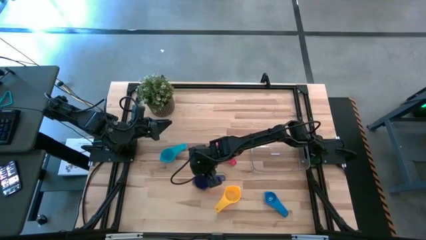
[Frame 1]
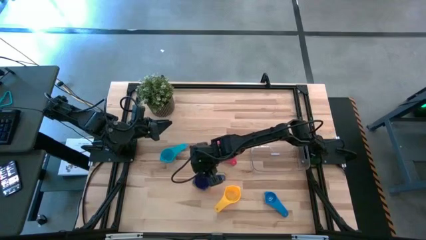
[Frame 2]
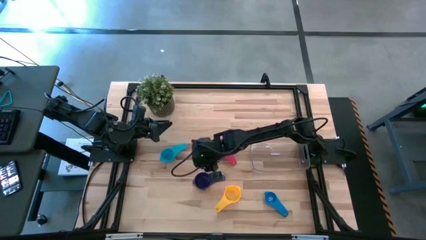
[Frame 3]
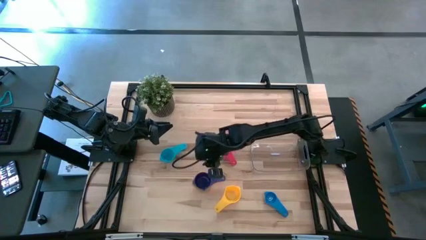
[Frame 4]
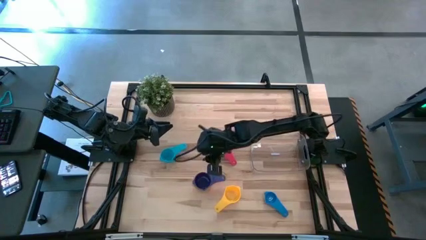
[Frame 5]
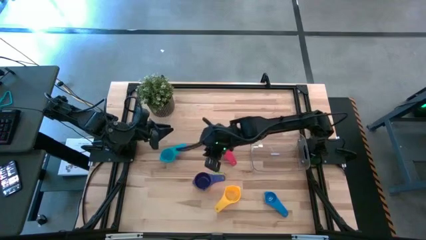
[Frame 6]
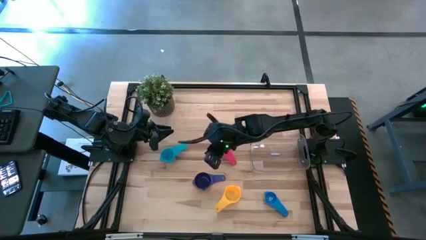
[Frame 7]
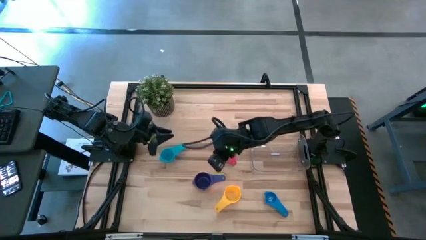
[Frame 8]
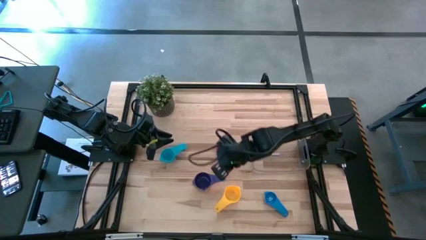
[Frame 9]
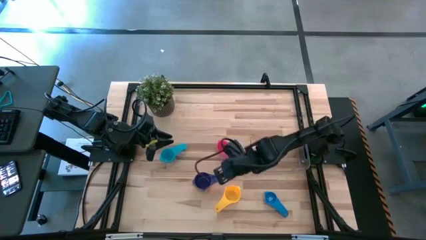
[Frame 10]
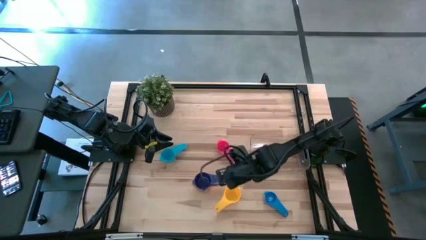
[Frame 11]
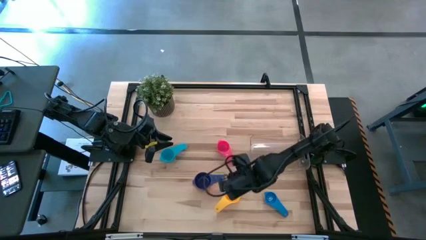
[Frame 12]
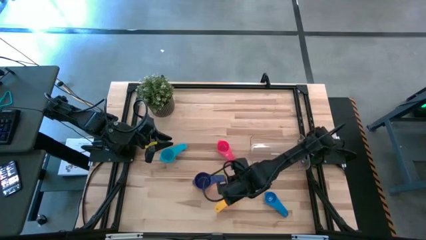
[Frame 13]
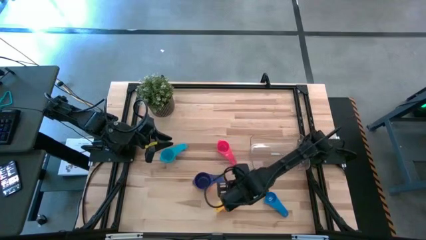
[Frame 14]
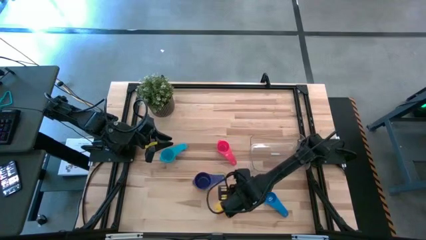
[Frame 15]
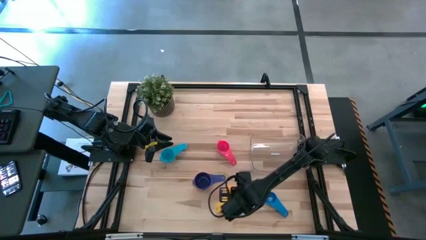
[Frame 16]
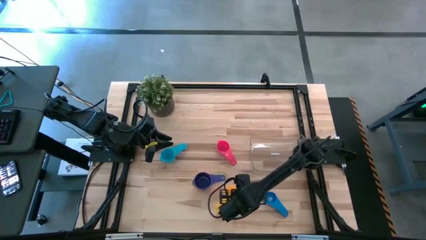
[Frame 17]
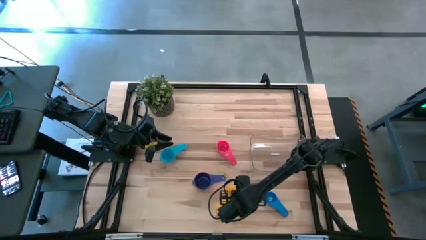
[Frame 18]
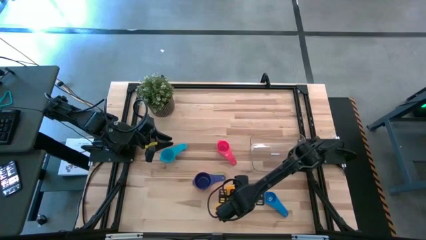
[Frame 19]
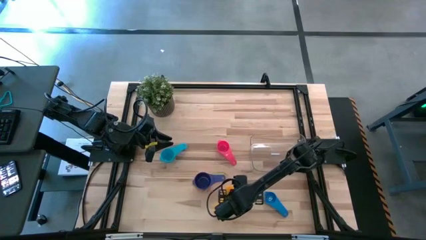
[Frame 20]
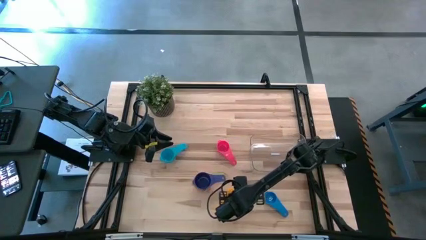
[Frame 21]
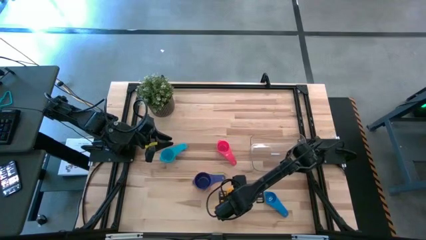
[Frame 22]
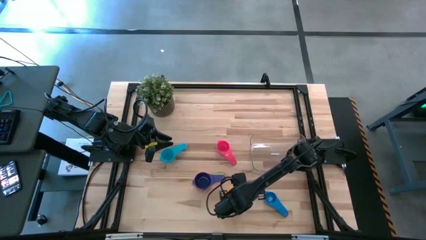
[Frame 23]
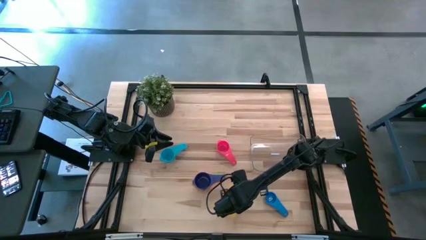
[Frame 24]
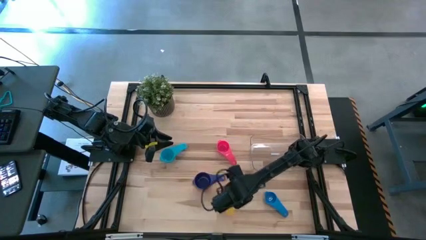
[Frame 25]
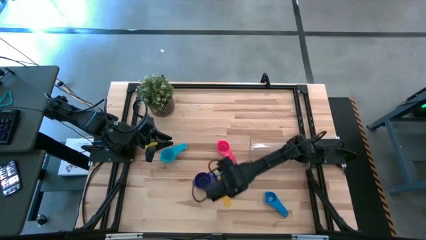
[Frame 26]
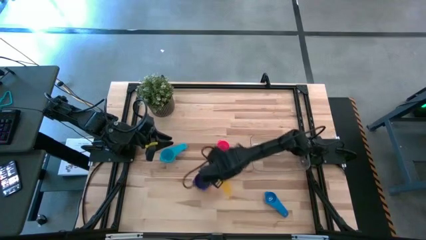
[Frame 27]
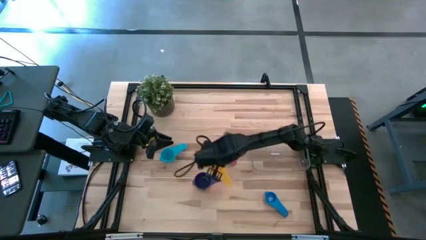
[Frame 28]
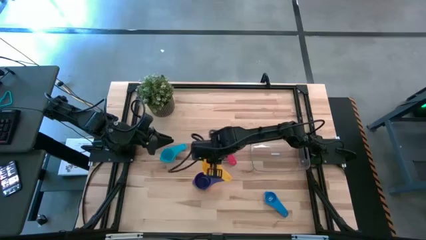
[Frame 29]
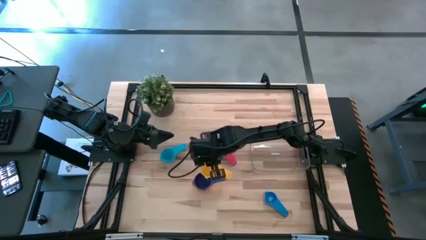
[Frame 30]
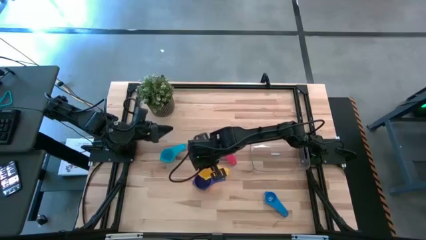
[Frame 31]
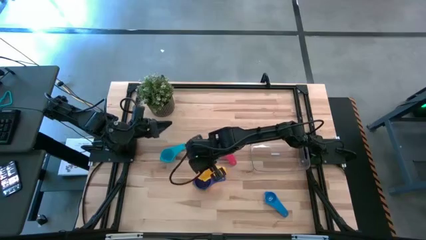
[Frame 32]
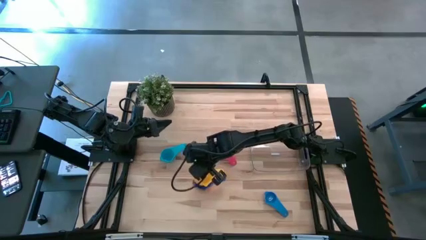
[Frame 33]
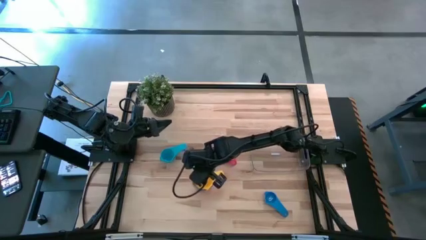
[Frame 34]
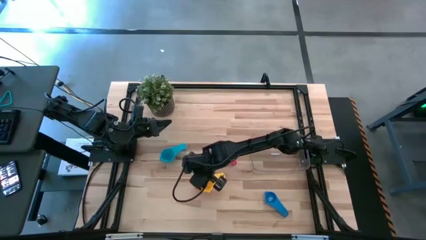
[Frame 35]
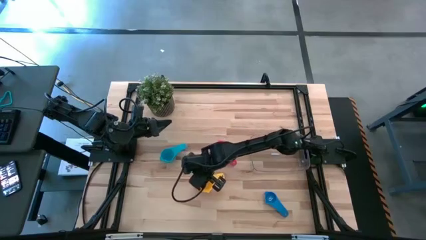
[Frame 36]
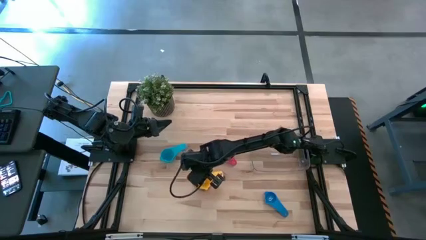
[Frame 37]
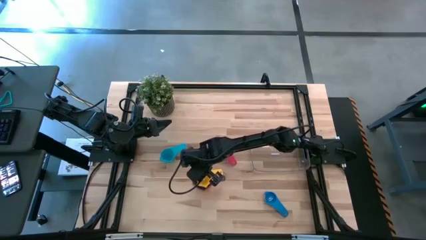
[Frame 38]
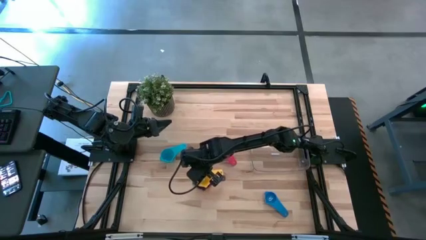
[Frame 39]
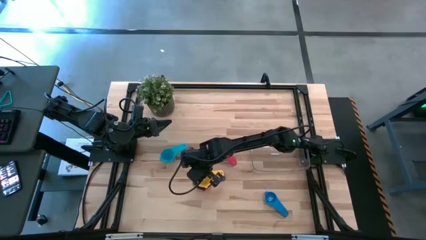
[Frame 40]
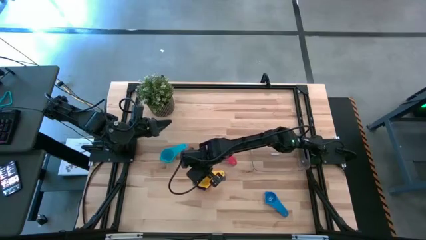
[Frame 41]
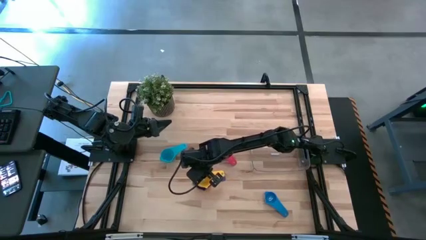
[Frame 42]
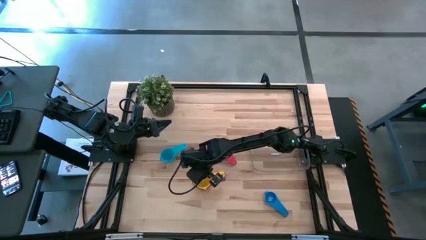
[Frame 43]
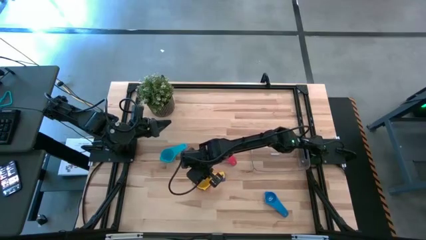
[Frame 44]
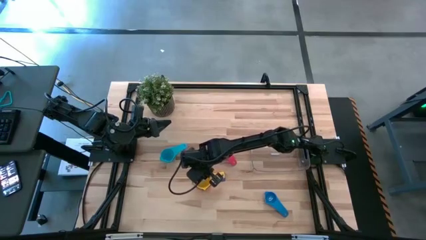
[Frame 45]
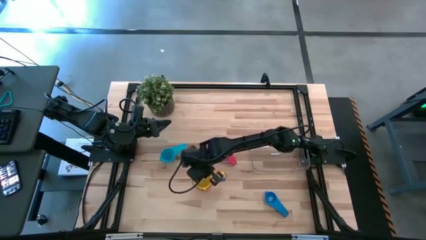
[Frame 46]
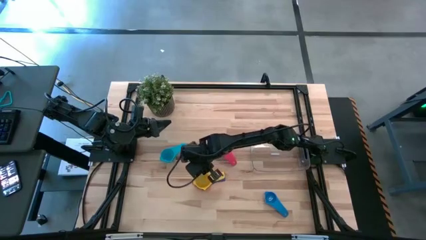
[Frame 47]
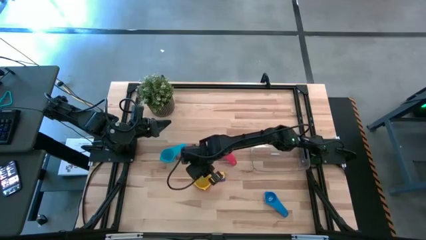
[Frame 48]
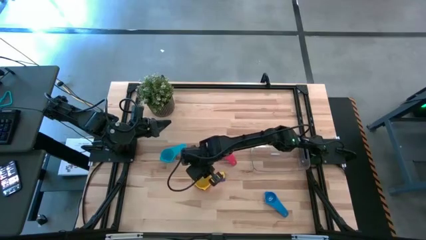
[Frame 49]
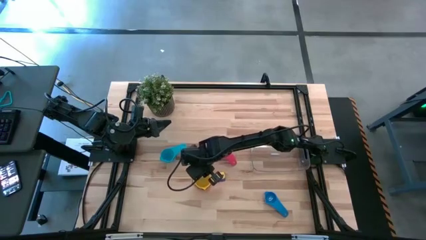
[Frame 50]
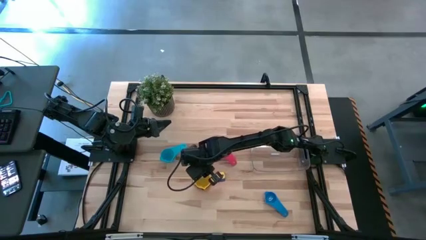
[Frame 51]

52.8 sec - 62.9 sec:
Task: Nest measuring cups in basket
Stack the yellow measuring cup on top of the purple measuring cup

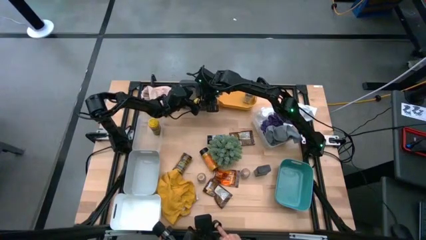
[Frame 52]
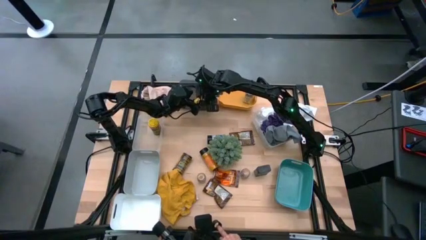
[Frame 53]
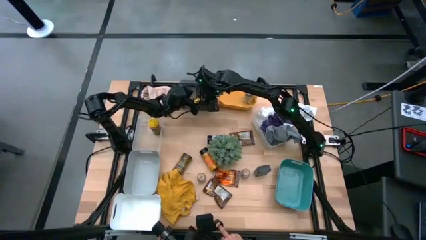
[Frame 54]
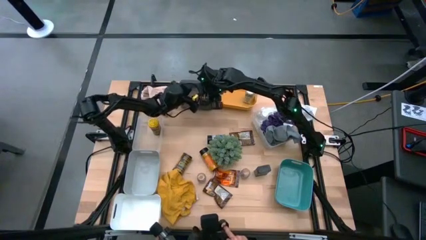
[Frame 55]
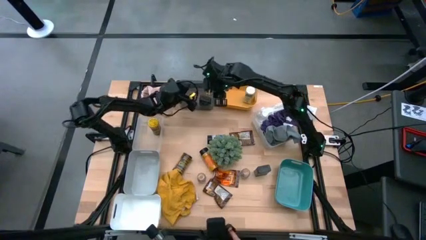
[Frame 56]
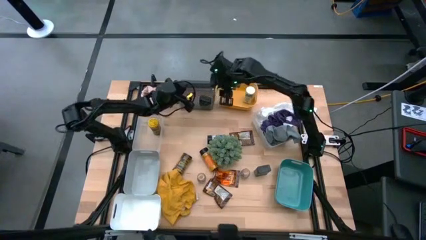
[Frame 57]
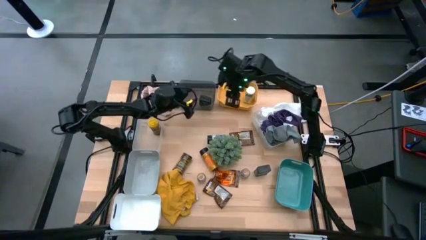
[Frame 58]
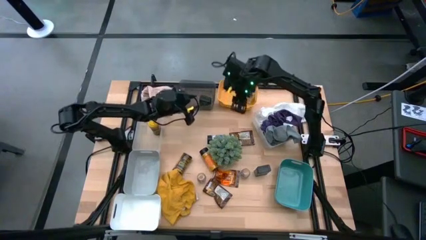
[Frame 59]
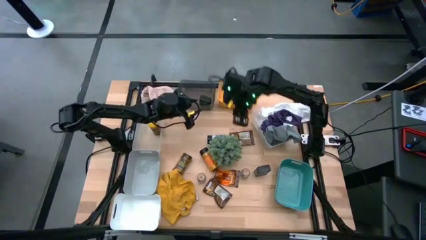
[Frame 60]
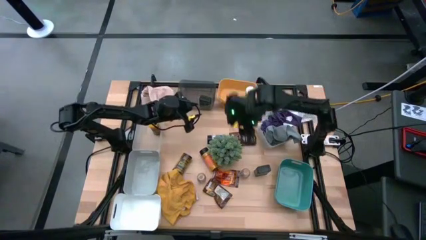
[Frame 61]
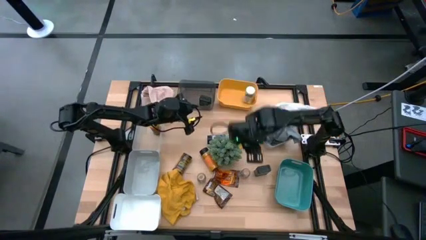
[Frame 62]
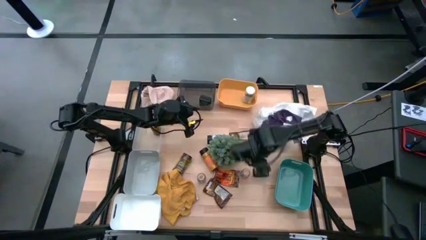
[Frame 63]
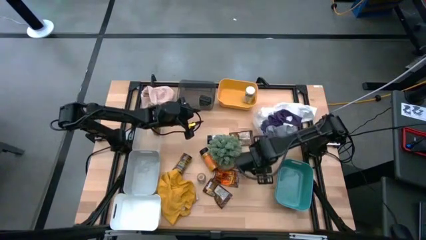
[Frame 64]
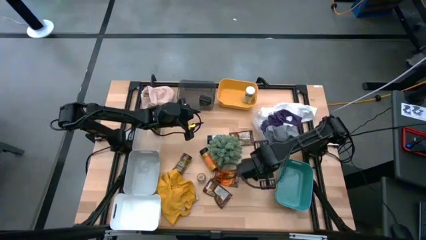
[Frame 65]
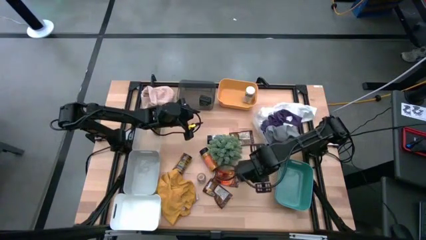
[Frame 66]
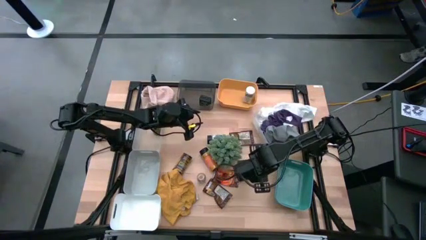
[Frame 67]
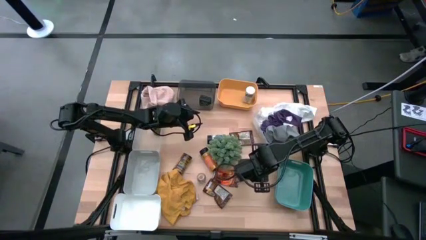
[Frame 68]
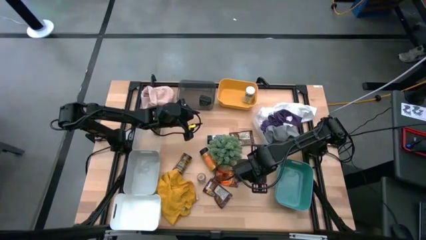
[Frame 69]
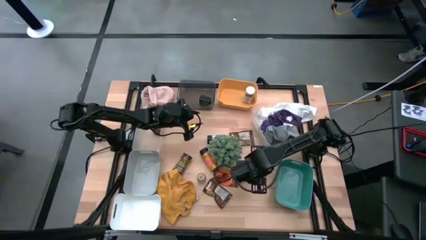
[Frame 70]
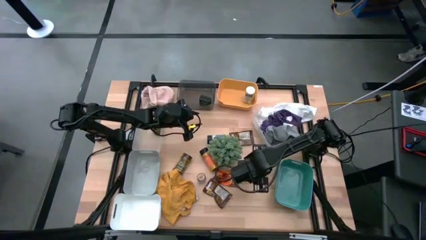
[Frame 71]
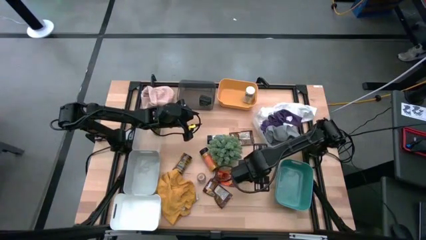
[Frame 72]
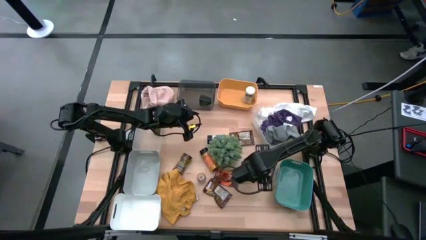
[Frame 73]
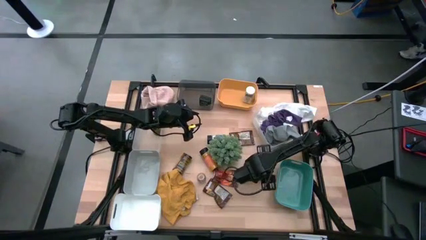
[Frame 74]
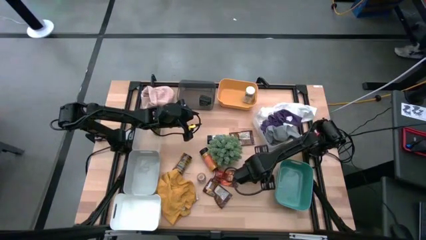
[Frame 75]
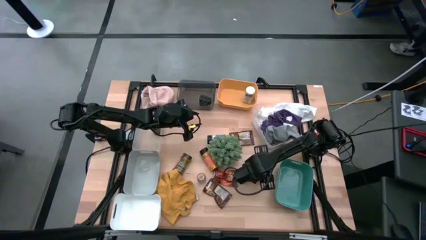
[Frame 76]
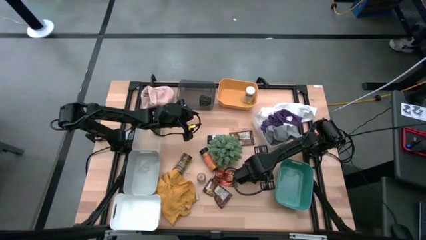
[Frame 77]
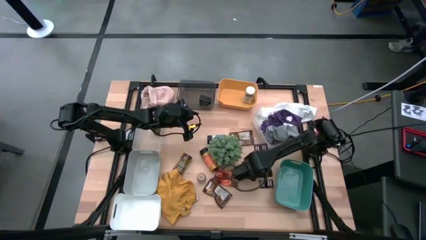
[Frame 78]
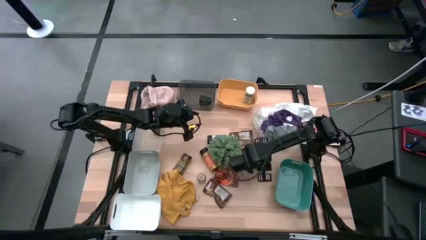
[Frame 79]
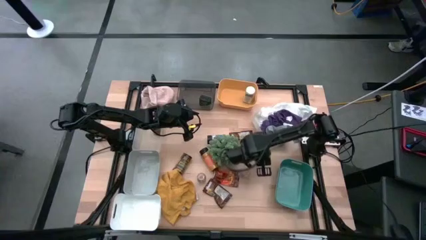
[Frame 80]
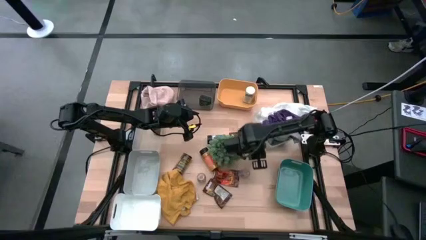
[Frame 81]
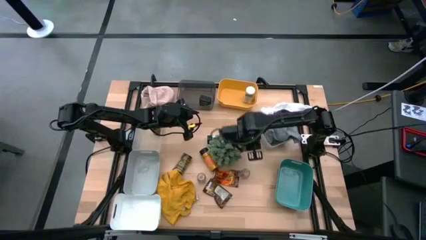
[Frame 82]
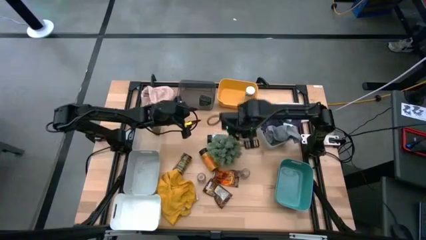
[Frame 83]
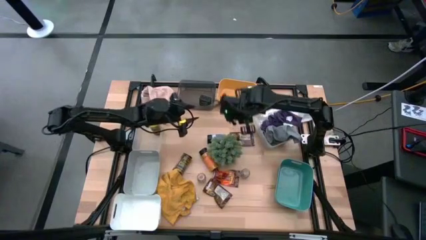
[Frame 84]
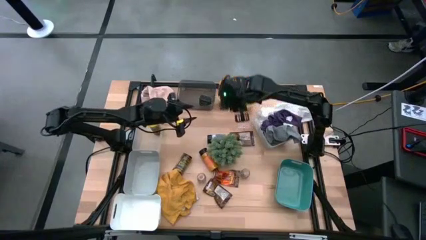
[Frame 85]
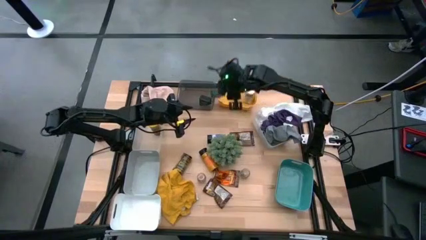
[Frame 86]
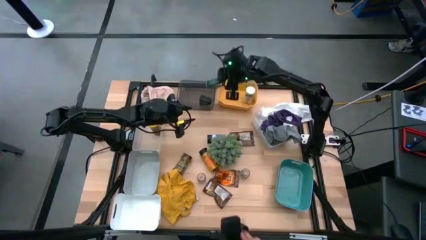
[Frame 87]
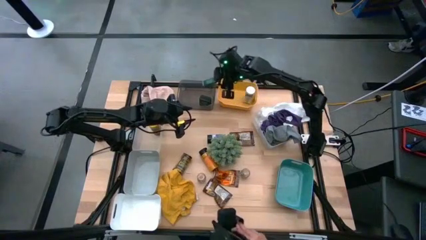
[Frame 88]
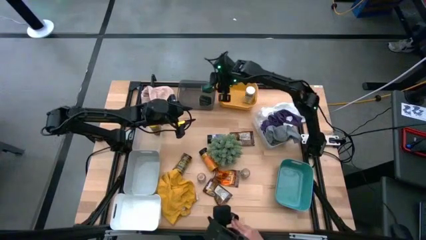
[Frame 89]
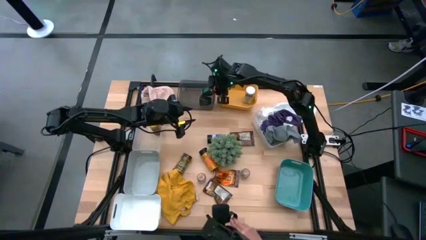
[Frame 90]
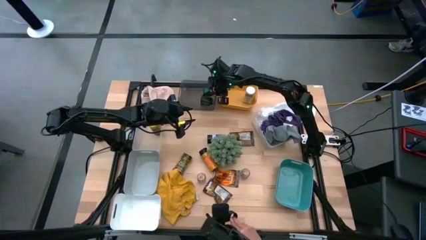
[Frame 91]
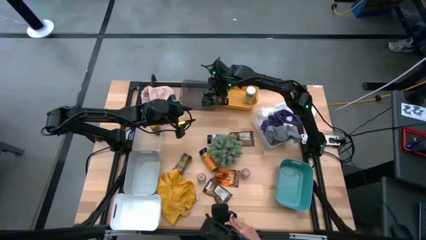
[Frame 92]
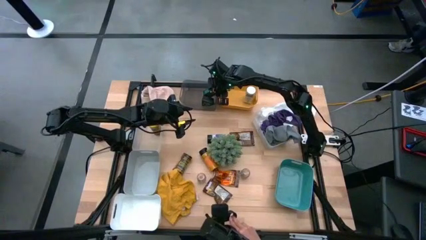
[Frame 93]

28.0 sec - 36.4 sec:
Task: Sort spices by type
Put the green spice can into the black transparent bin
